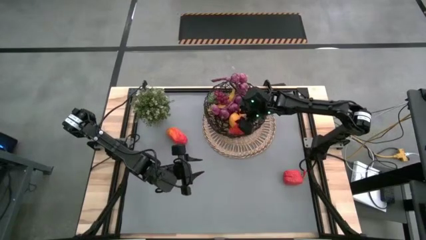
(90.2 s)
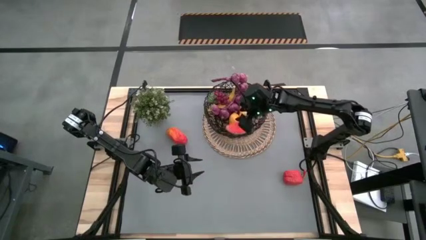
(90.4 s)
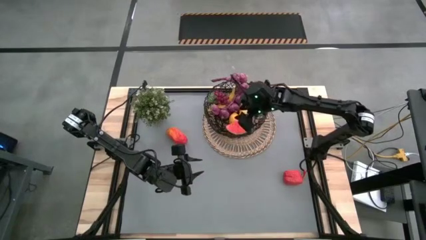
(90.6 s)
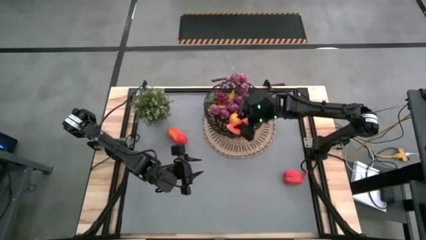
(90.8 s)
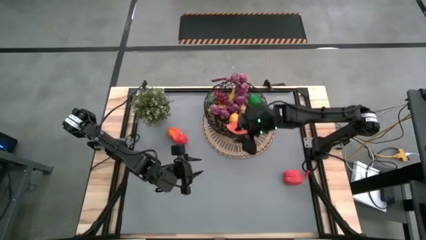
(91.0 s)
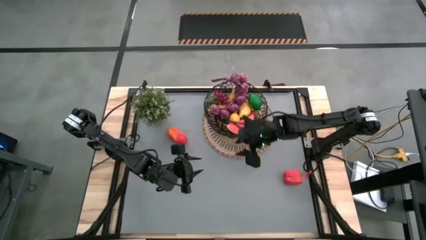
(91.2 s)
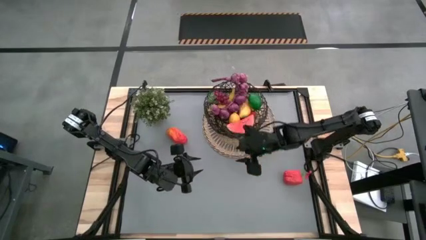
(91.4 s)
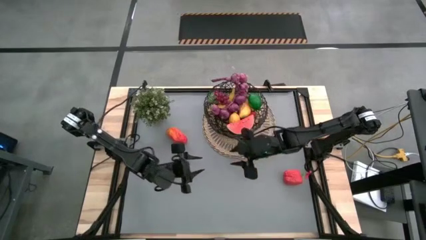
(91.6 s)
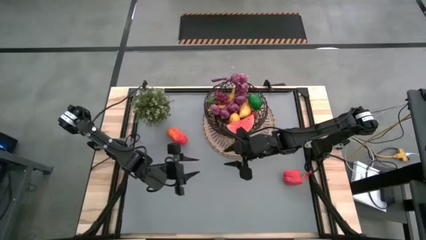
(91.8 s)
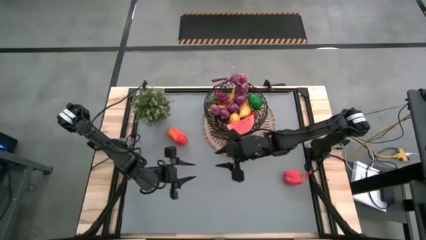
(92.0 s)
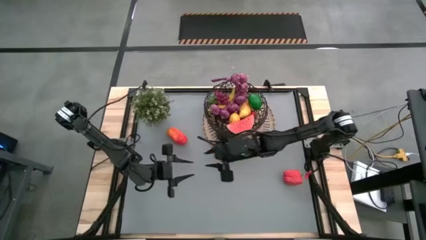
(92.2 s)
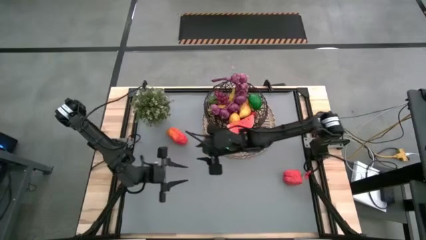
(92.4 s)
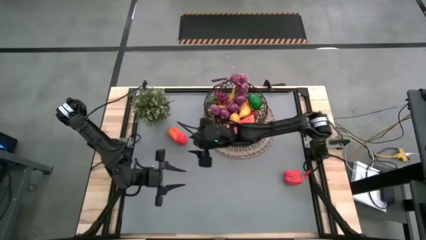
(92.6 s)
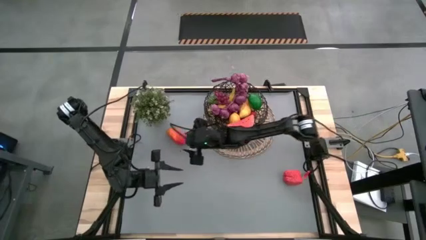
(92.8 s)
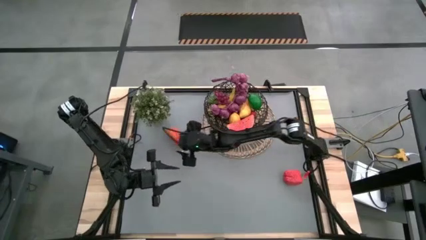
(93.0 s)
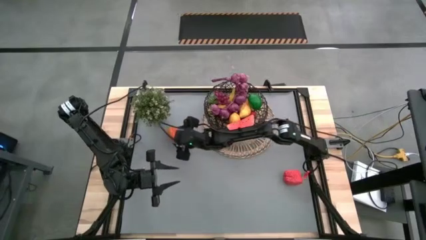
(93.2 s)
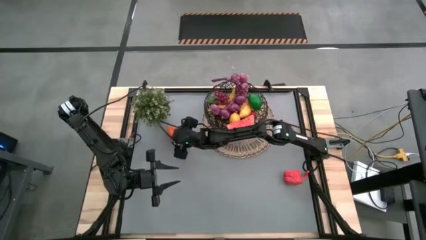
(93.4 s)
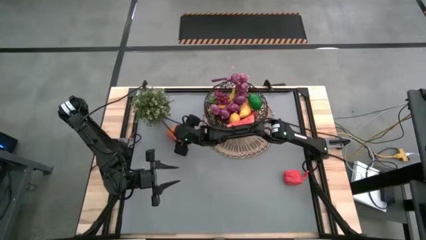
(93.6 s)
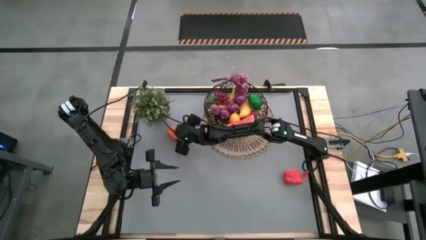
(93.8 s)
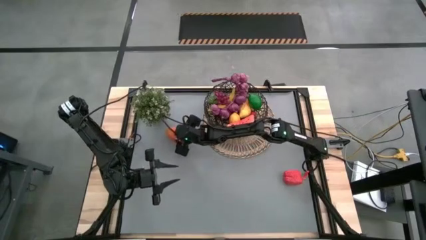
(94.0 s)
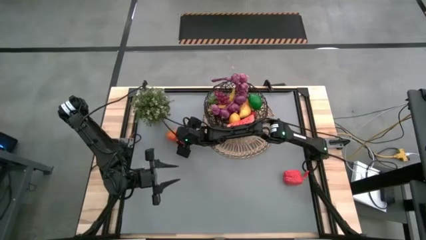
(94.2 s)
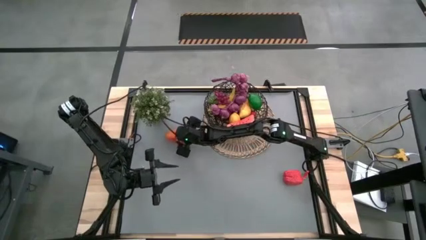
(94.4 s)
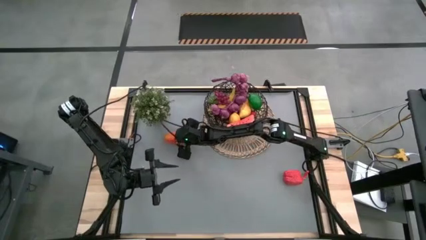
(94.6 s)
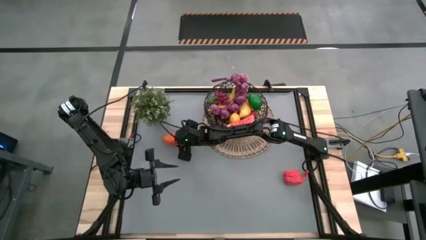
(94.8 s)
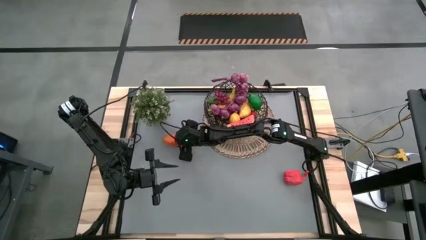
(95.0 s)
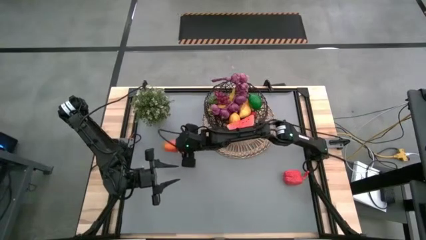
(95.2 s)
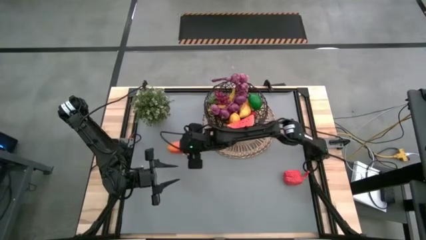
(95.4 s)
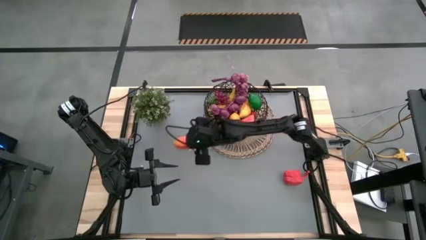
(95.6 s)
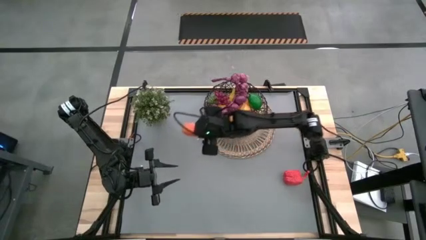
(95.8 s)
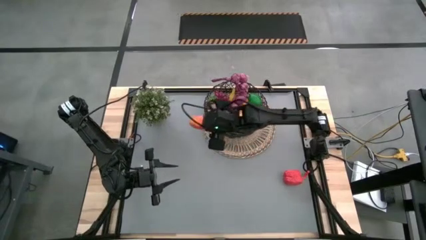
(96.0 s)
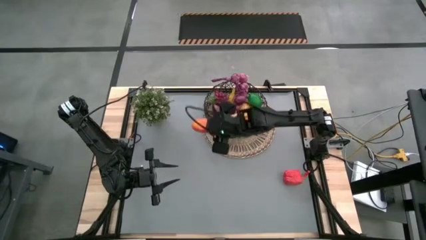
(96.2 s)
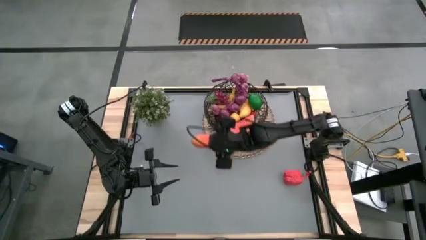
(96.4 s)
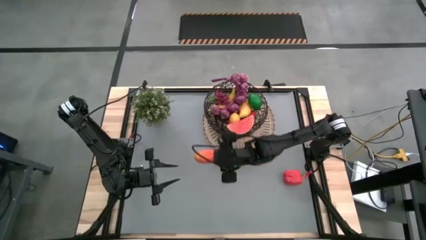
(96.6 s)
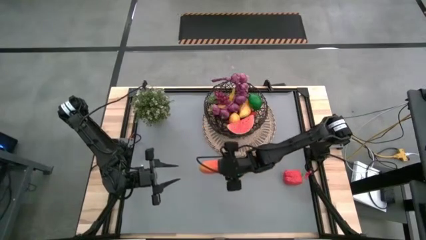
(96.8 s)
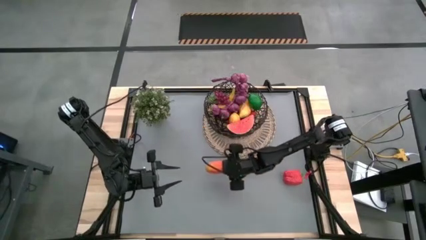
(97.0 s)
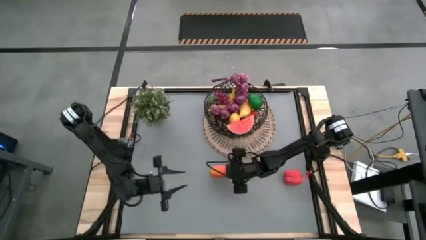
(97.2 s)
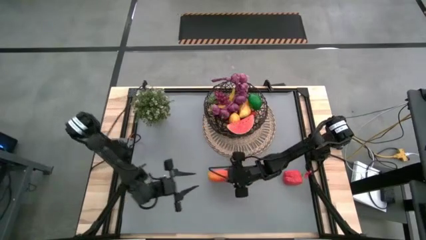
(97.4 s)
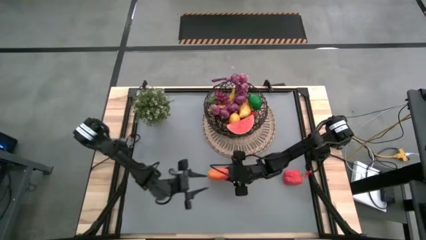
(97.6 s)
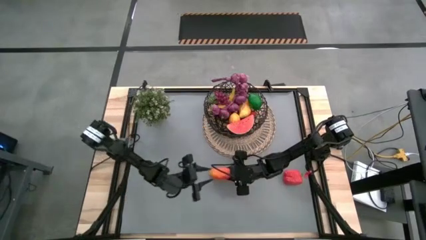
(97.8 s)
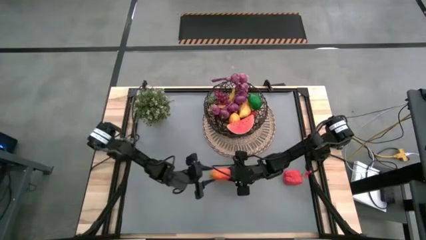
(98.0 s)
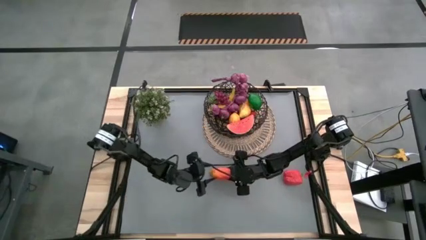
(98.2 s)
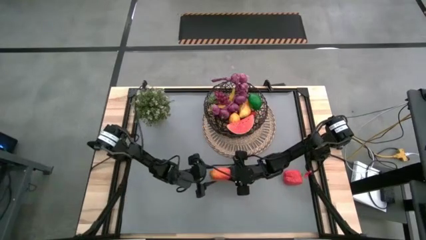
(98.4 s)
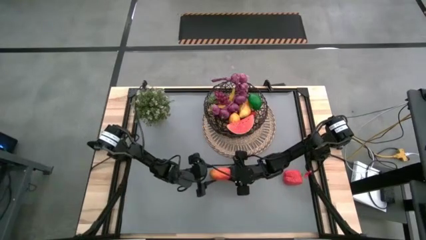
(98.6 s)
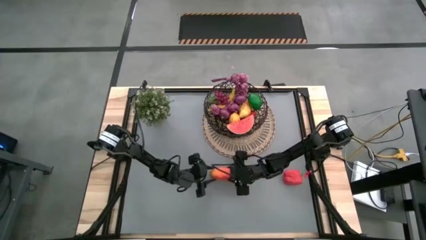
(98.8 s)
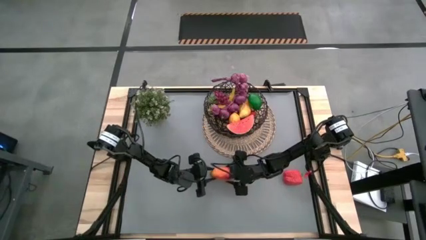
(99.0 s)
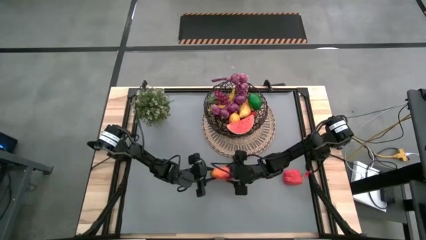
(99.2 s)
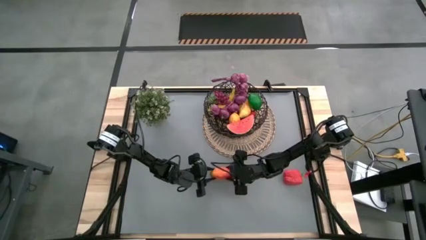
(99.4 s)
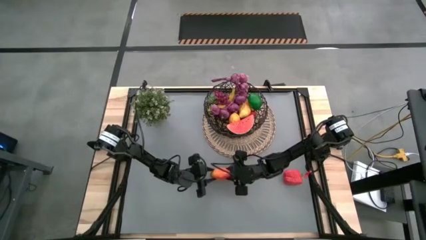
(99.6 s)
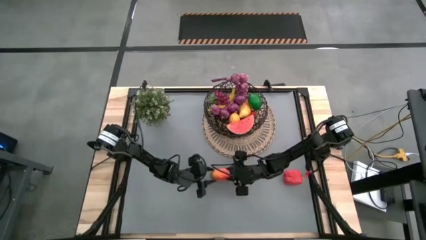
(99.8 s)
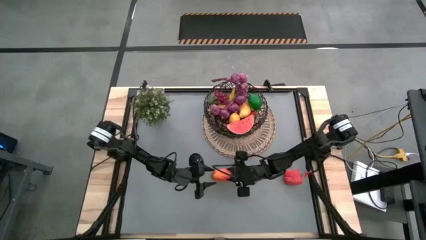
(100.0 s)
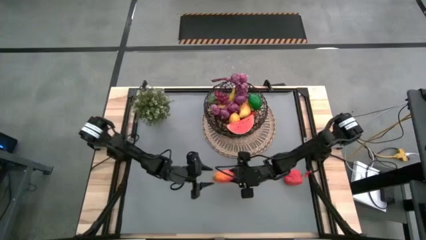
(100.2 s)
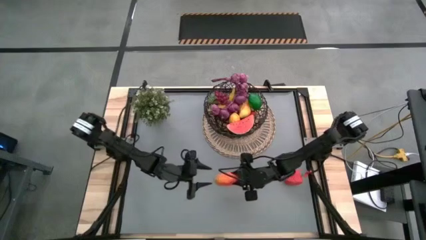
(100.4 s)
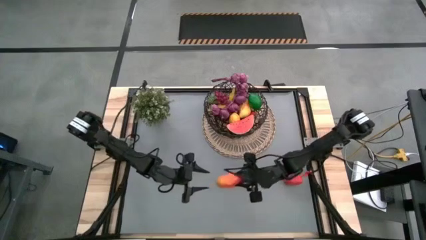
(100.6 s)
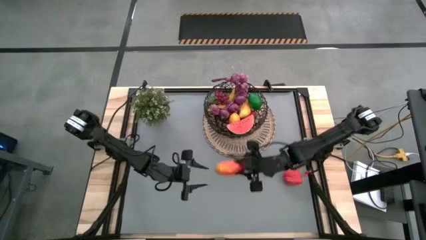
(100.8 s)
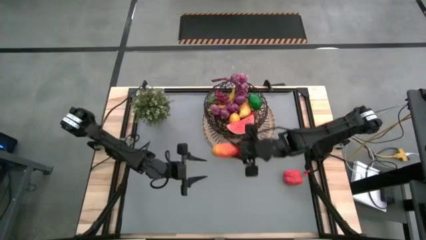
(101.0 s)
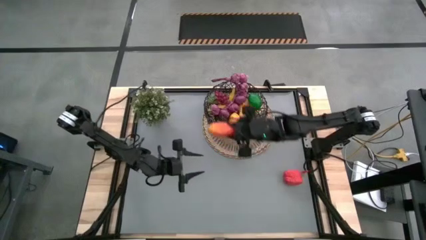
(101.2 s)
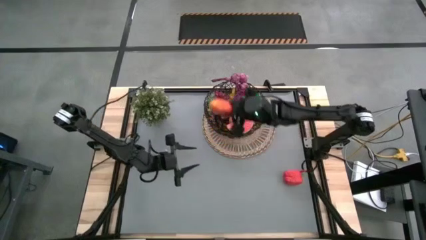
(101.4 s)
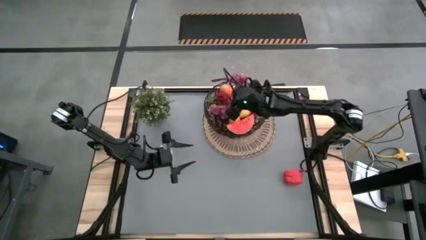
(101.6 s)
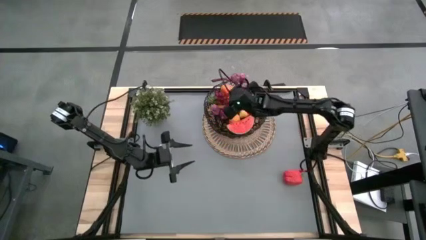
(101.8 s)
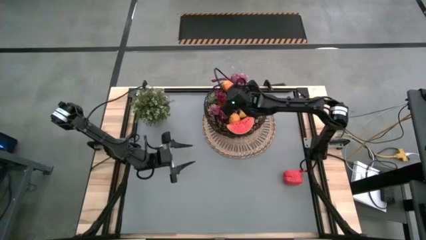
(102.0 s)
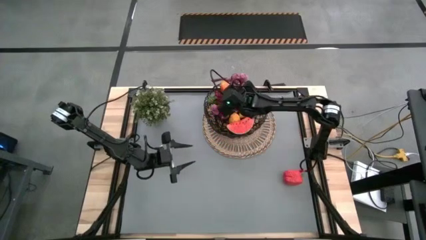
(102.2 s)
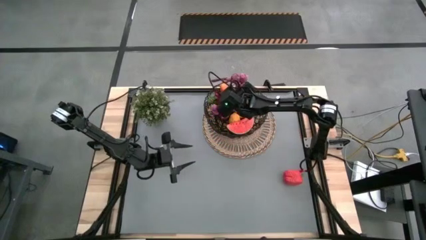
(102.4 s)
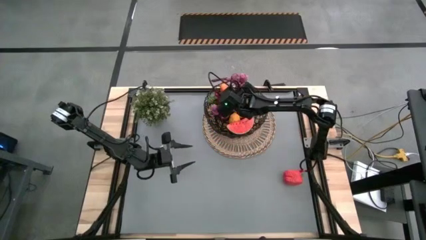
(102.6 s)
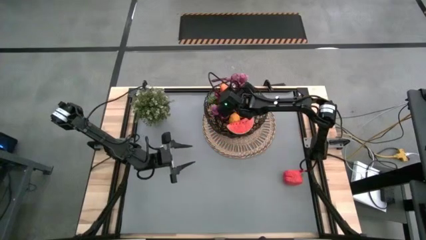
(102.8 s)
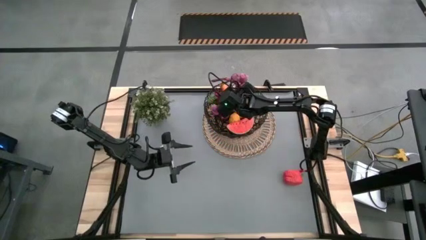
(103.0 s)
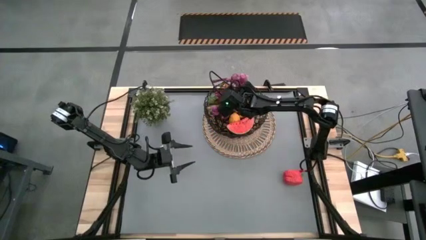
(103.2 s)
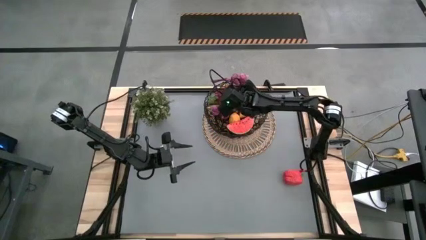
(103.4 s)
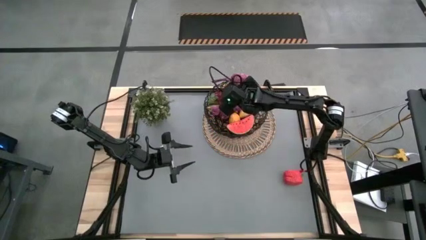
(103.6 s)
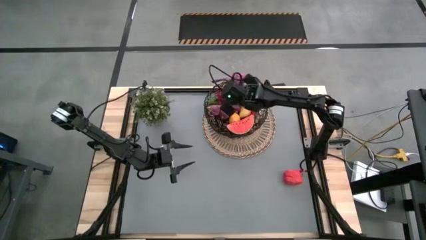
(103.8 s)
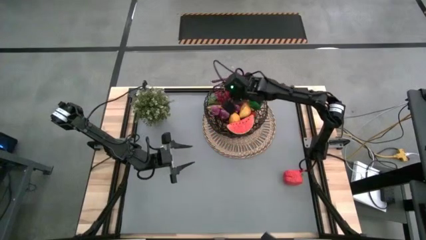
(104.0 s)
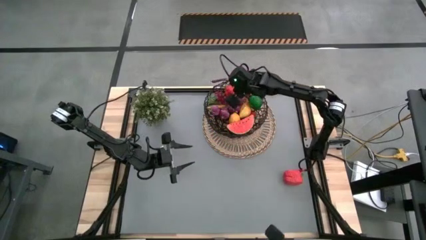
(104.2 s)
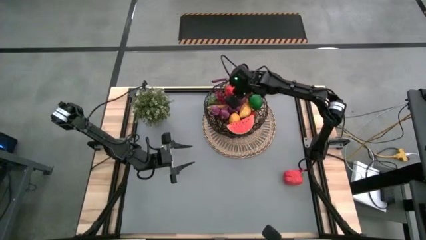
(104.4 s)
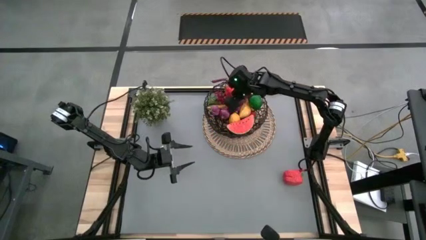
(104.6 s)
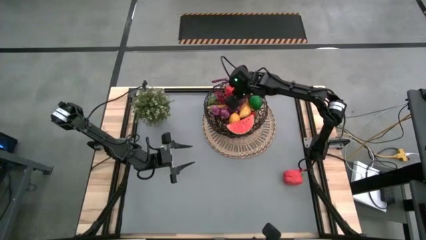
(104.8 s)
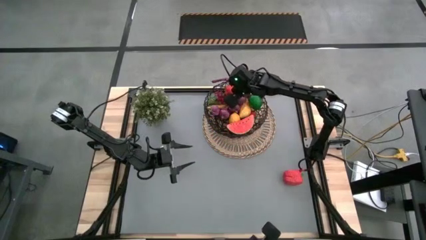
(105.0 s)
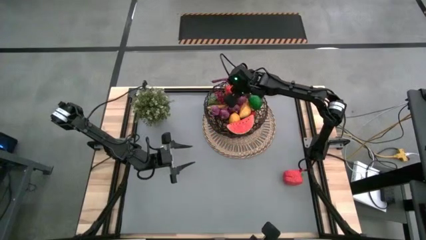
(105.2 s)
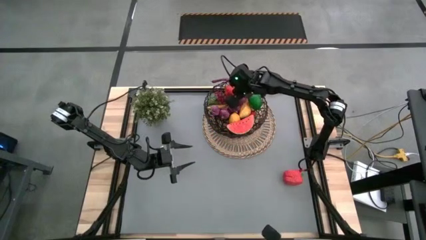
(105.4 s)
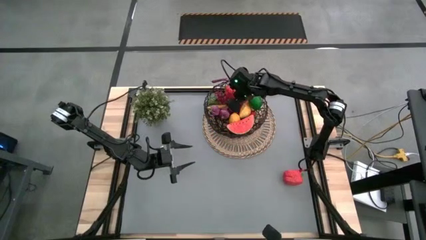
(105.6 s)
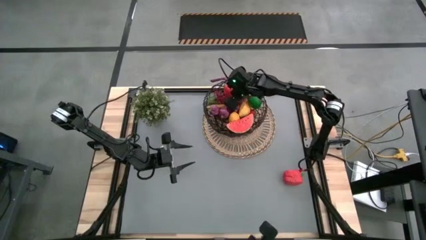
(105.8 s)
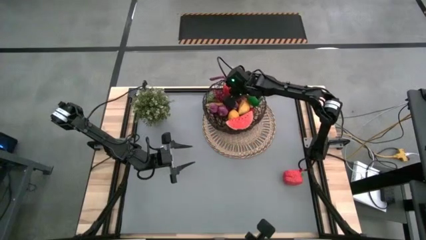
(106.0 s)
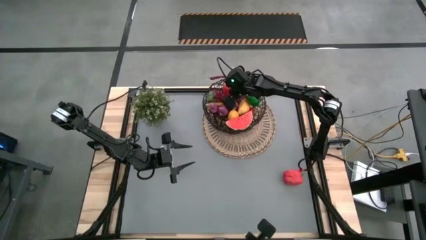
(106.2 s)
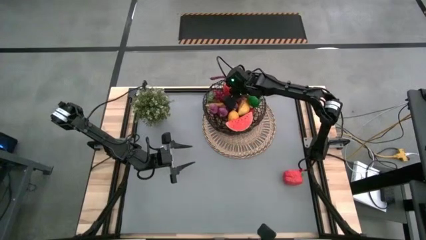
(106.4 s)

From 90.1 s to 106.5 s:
Task: Build produce basket
Put the red mango into the black wire basket
